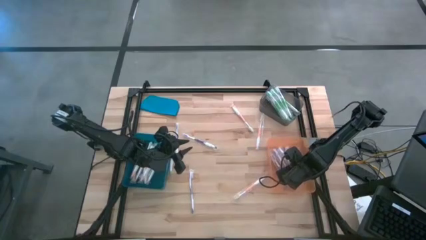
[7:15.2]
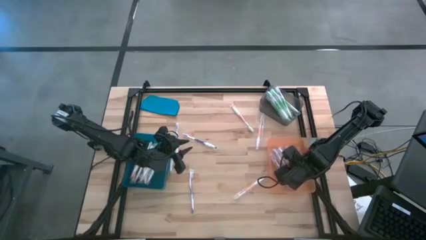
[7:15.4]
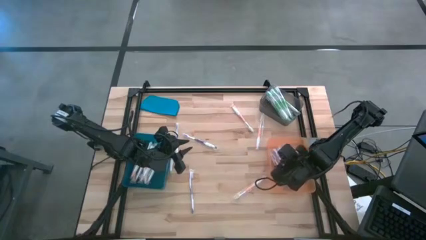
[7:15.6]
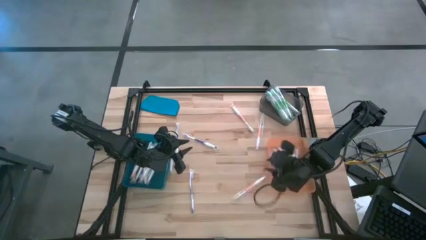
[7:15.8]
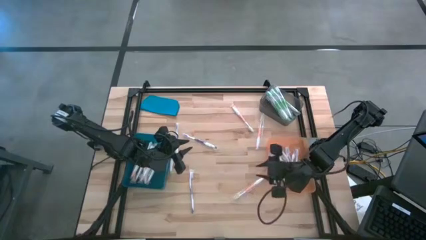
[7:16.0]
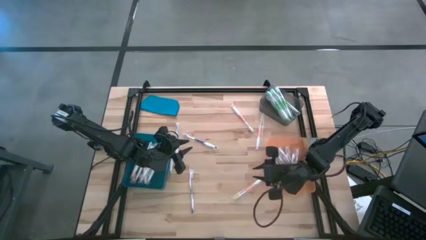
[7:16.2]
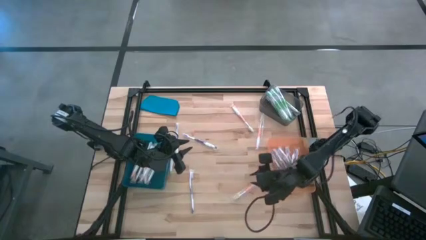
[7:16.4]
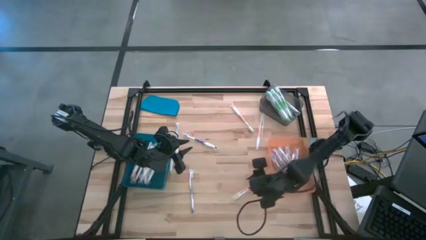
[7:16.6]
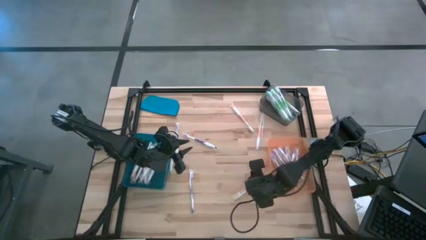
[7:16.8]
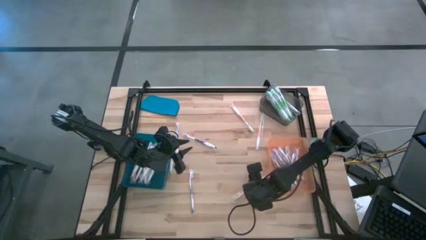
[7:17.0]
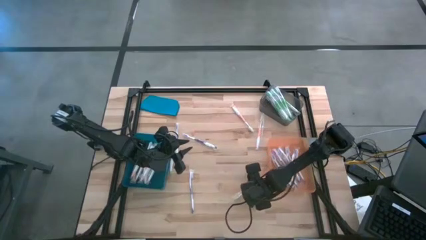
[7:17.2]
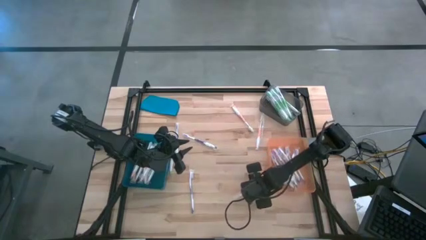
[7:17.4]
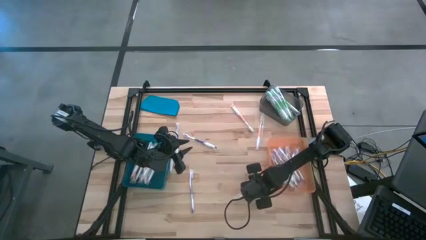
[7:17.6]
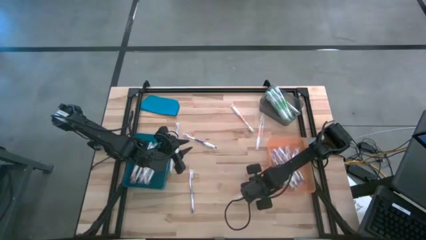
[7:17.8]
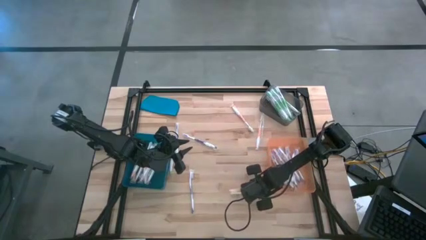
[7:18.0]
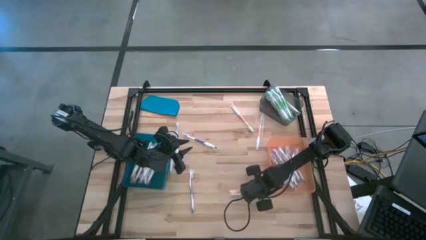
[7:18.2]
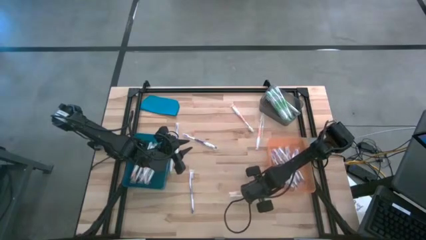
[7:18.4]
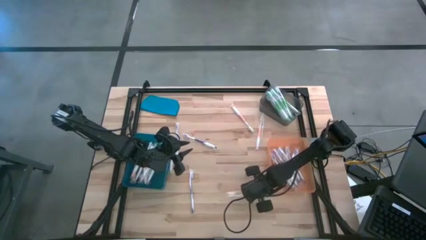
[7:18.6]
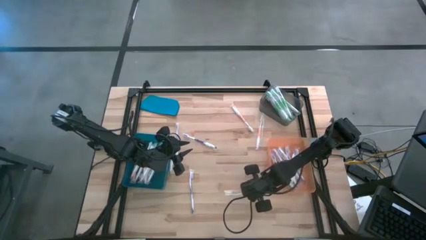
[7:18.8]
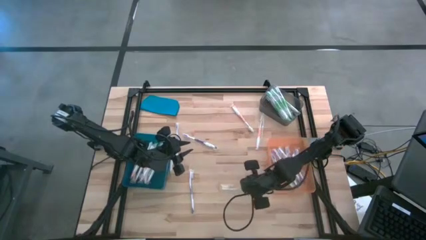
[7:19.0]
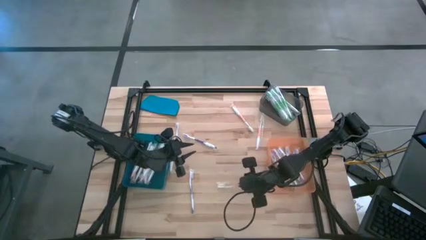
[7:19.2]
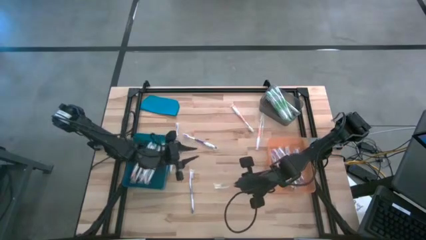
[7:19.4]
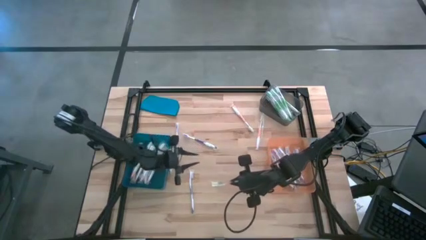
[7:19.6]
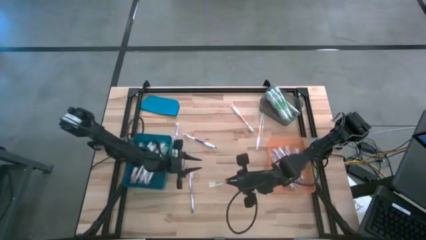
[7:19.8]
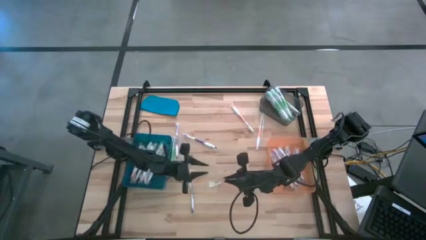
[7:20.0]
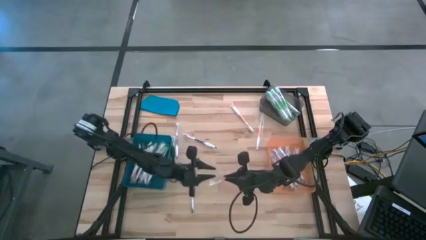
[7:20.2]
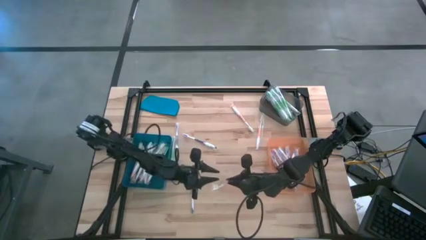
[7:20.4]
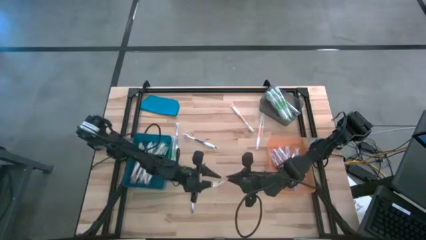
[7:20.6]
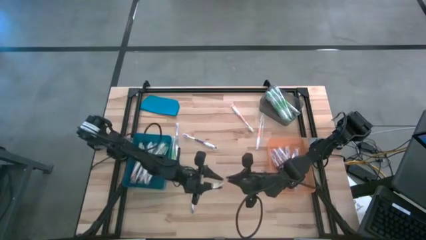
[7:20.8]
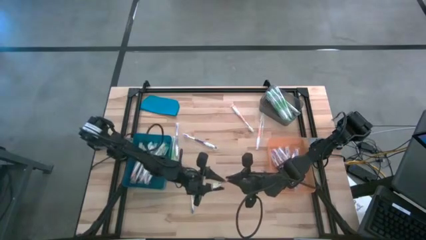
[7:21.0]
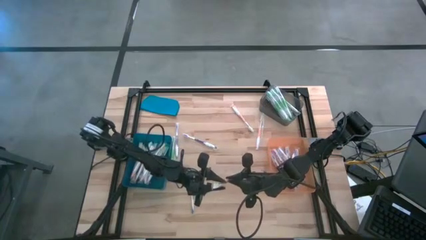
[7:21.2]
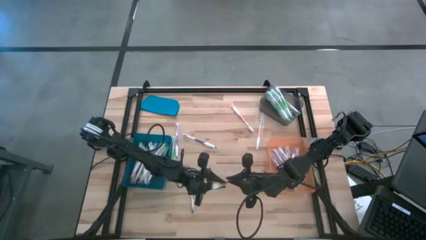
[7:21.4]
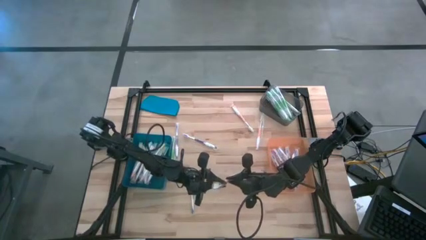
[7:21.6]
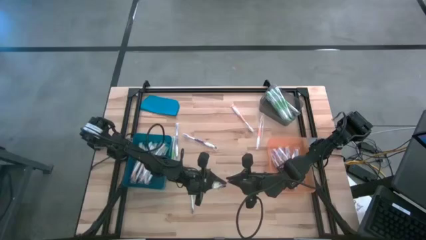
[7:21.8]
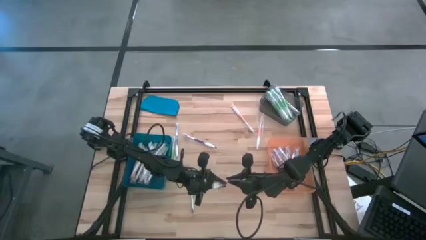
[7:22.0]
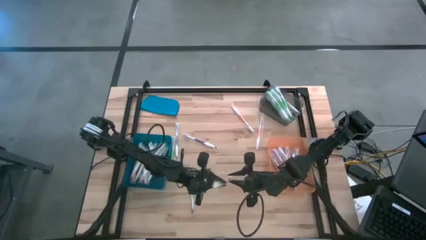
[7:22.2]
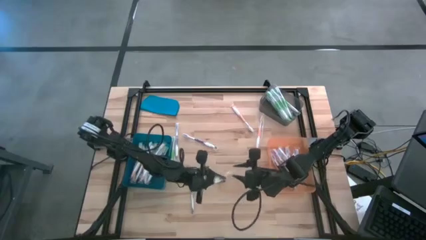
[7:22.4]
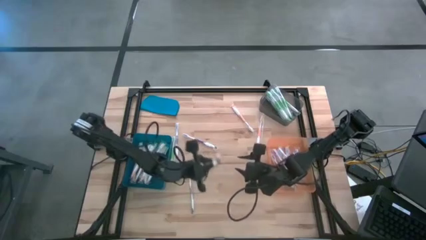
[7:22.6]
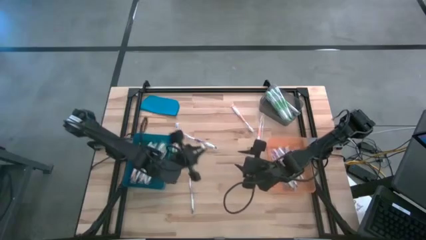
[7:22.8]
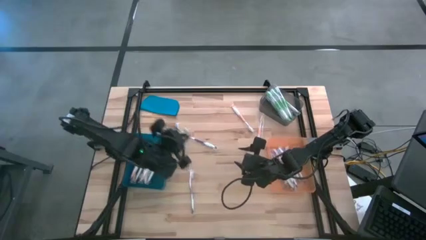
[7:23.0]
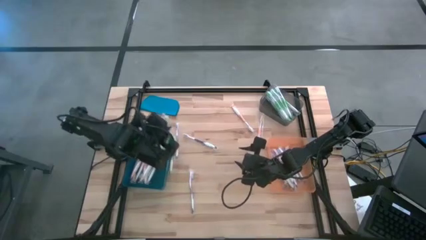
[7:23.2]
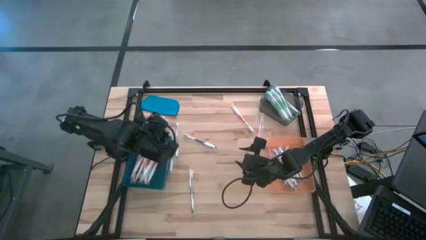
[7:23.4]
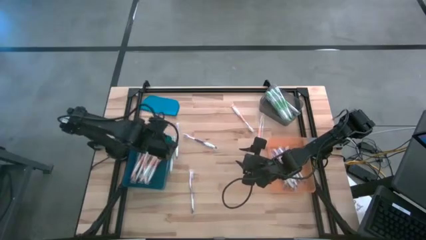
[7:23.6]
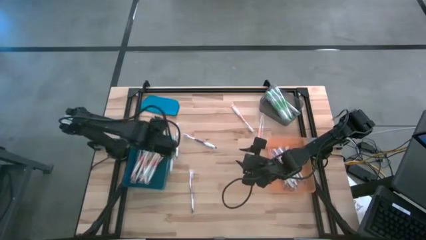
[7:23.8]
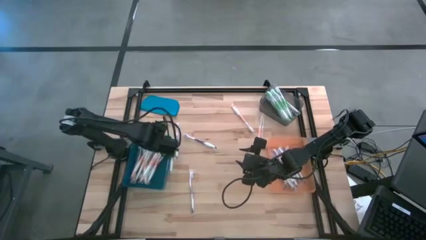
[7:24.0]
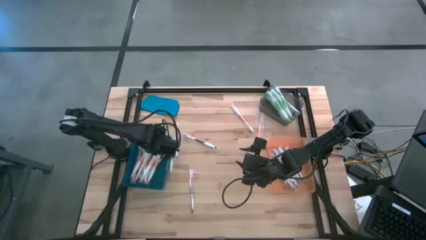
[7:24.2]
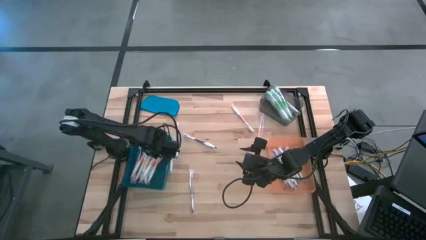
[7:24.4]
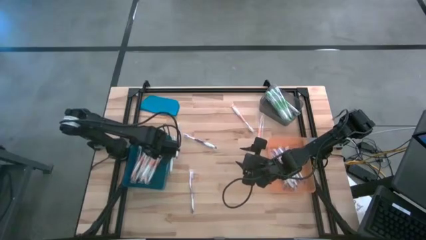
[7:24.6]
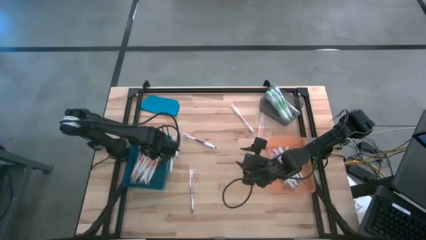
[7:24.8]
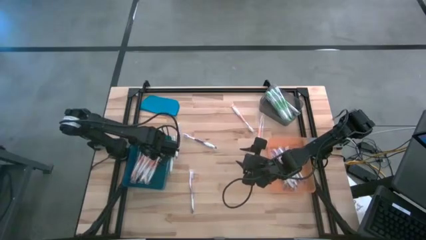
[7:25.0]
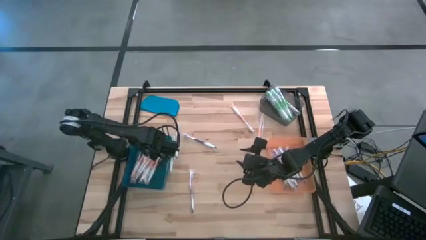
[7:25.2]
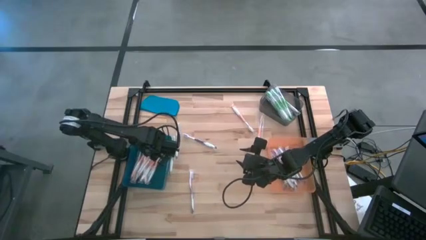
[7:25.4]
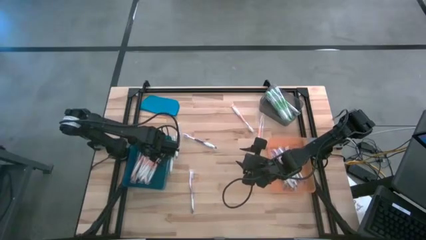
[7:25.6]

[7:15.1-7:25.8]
Task: Pick & Place Toothbrushes
Put the orange toothbrush into the blue bin

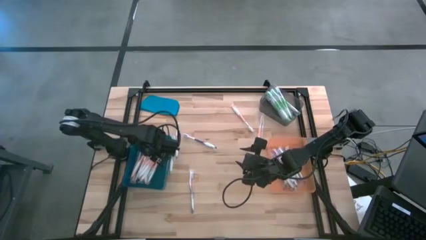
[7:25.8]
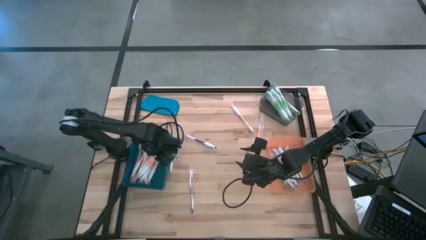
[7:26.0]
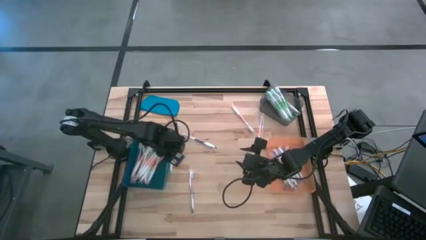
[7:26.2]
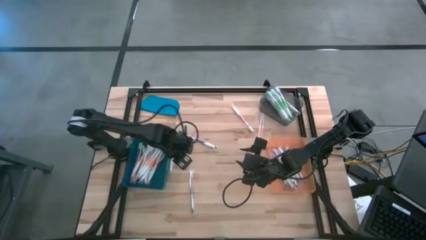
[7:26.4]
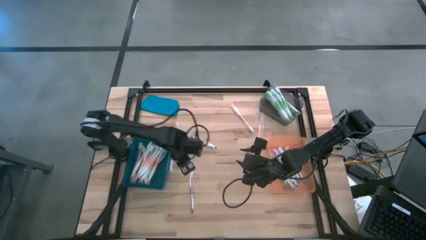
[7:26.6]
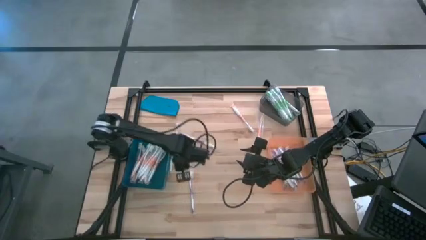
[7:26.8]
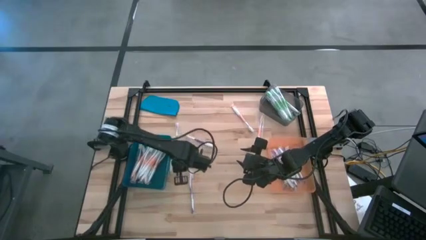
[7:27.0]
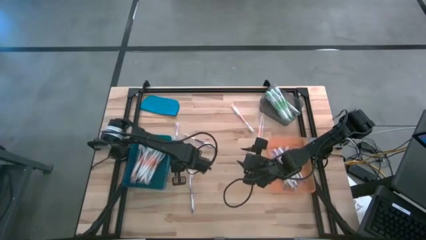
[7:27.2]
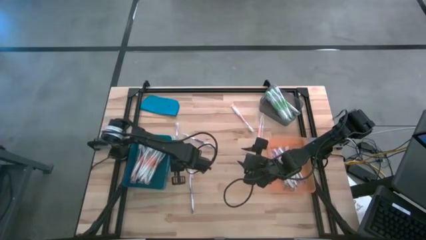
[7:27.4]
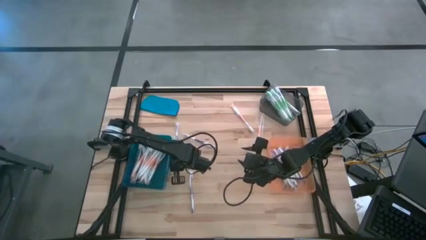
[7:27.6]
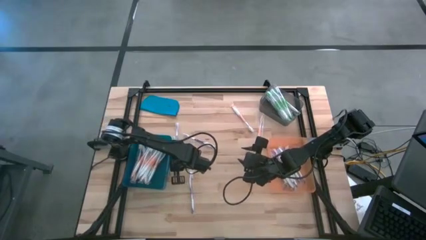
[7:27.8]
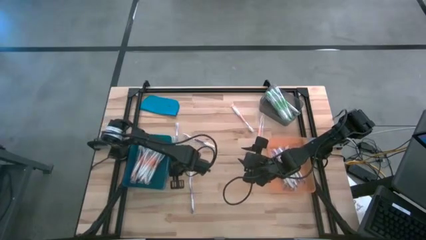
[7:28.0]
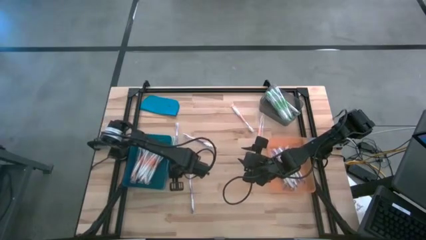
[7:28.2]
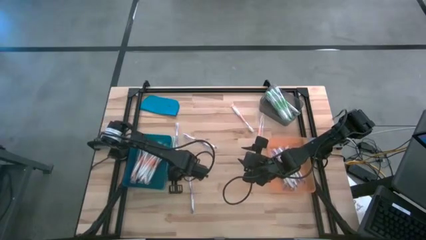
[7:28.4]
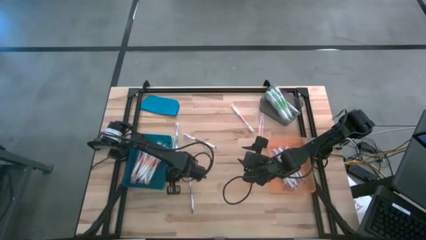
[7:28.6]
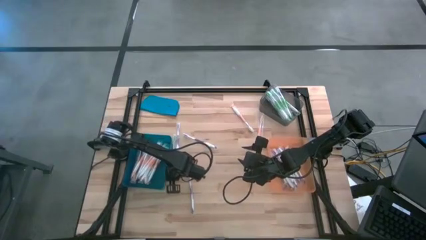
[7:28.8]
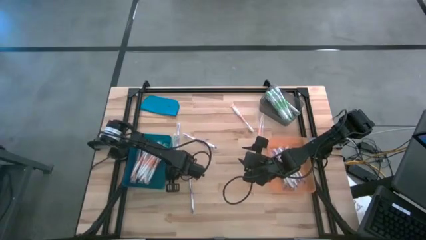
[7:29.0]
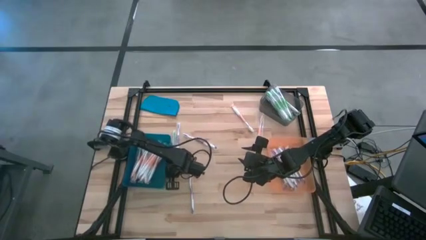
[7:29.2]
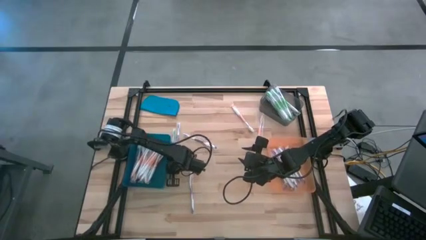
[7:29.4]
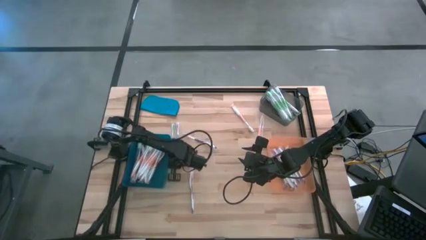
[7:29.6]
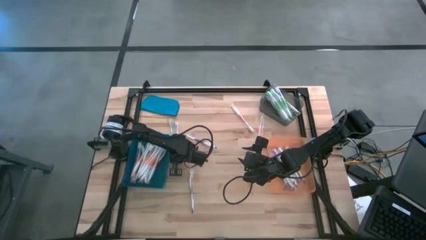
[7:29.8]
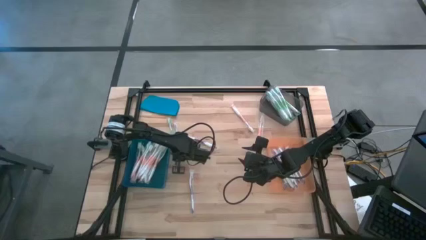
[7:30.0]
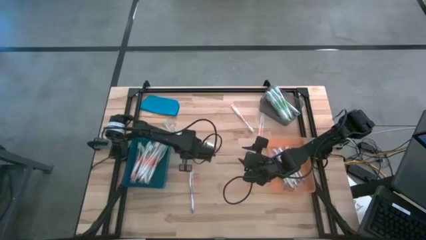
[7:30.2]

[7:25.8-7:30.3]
Adjust the green toothbrush
